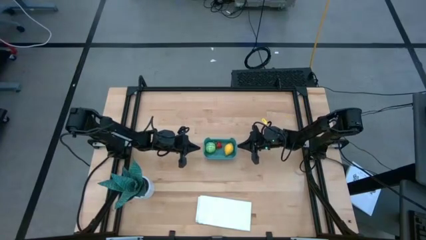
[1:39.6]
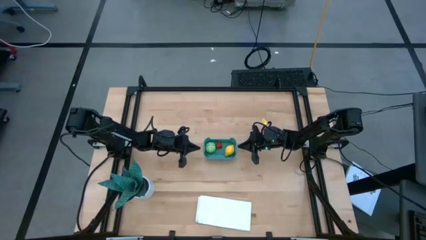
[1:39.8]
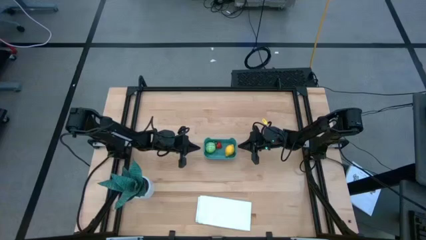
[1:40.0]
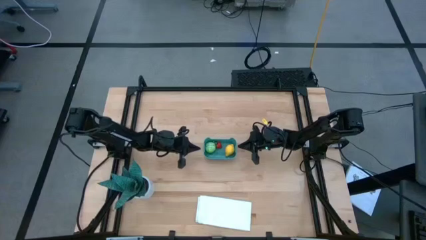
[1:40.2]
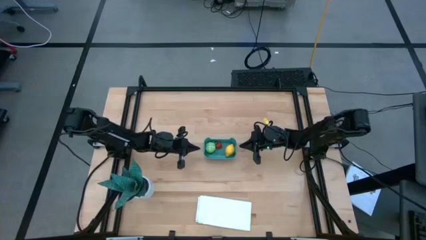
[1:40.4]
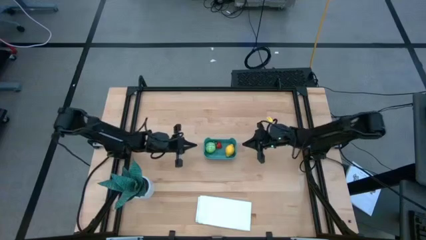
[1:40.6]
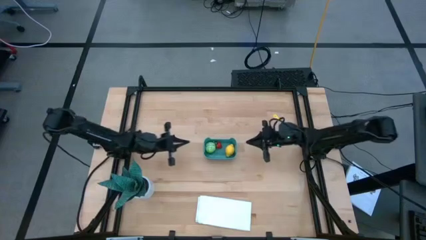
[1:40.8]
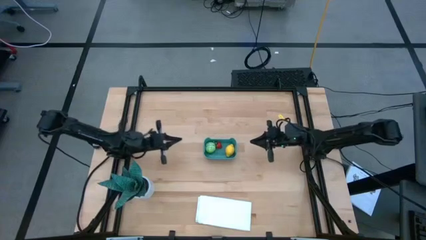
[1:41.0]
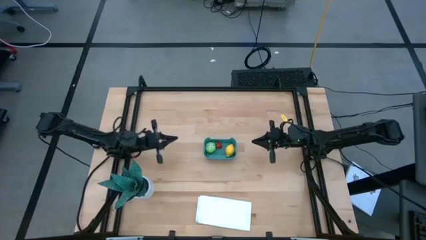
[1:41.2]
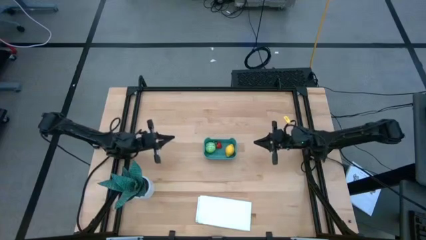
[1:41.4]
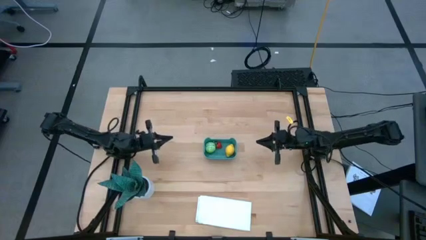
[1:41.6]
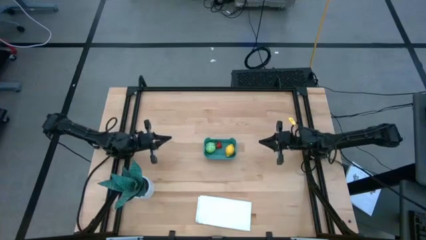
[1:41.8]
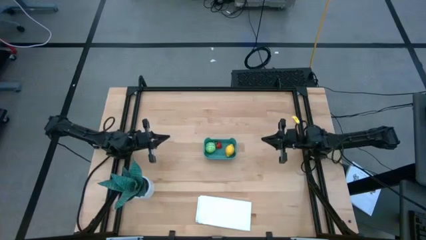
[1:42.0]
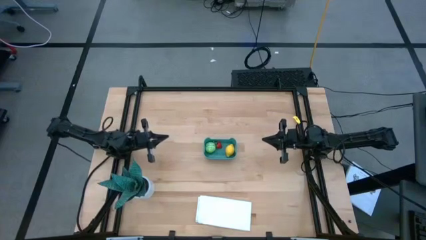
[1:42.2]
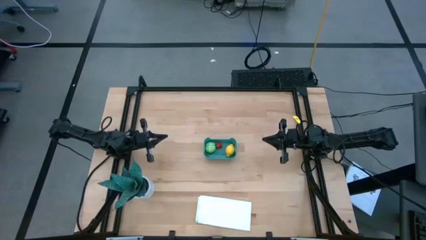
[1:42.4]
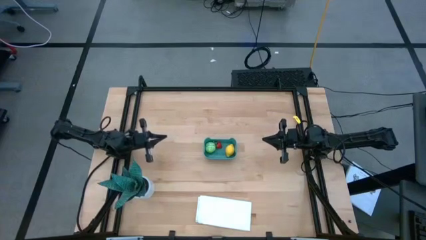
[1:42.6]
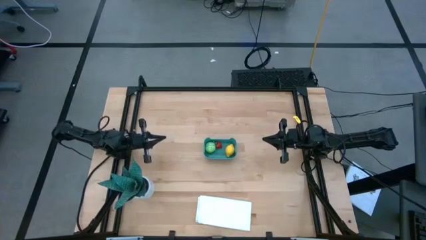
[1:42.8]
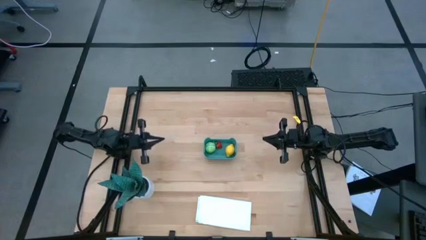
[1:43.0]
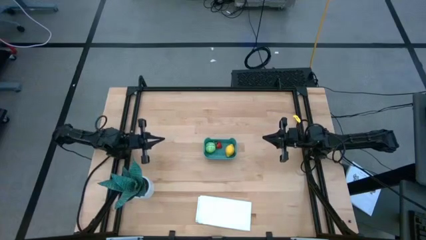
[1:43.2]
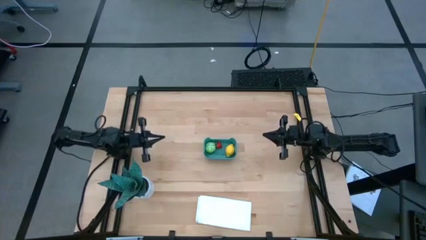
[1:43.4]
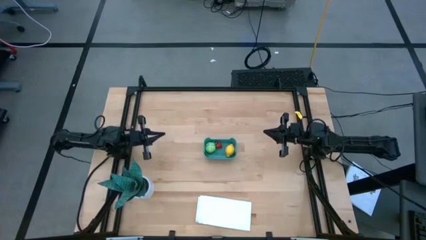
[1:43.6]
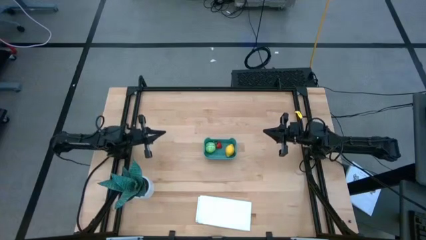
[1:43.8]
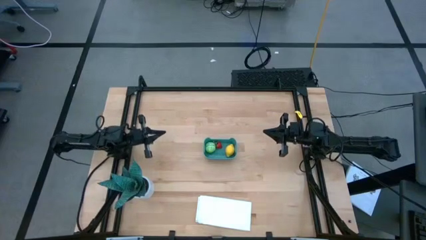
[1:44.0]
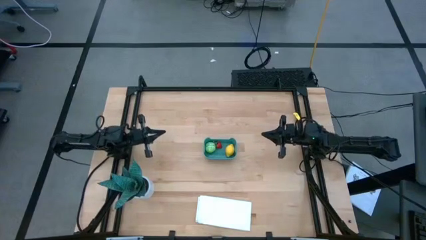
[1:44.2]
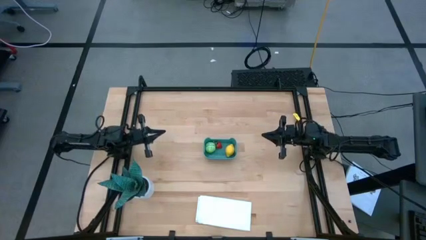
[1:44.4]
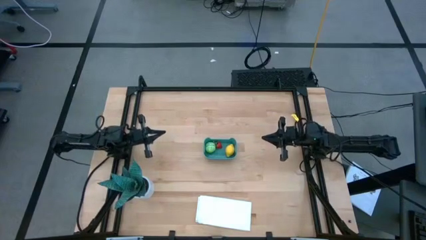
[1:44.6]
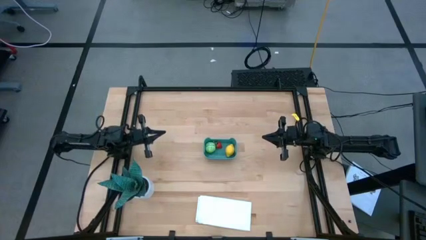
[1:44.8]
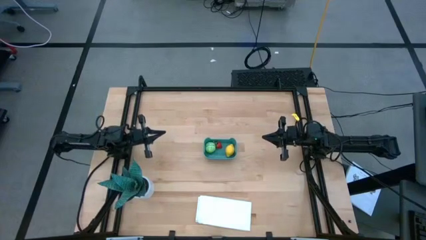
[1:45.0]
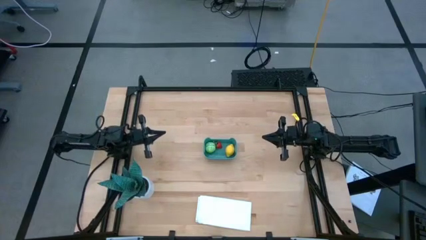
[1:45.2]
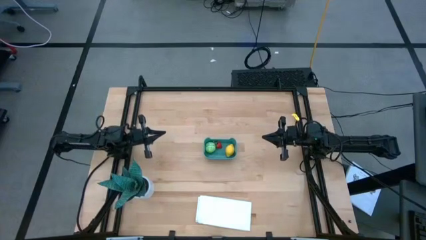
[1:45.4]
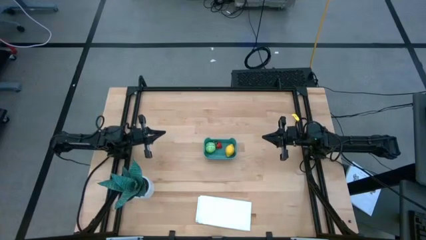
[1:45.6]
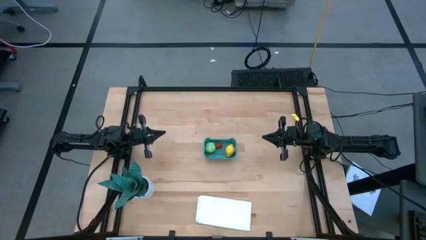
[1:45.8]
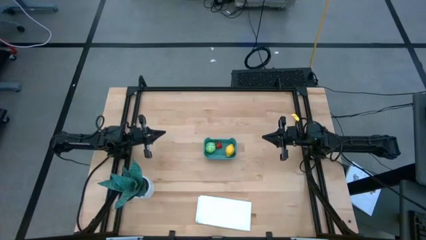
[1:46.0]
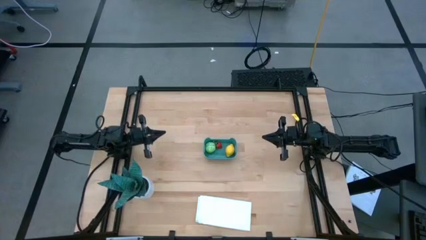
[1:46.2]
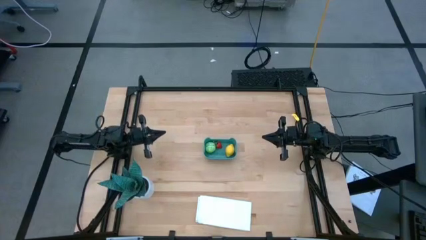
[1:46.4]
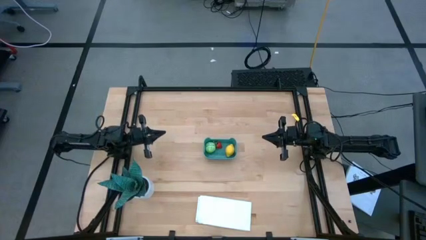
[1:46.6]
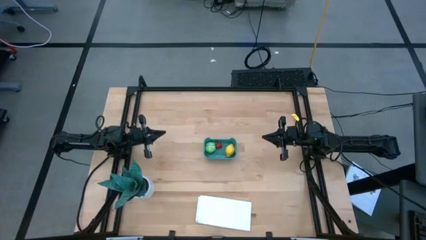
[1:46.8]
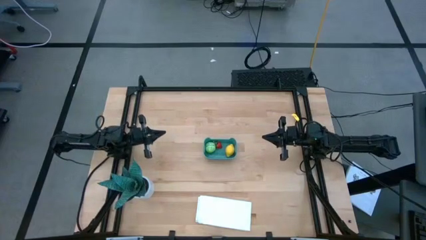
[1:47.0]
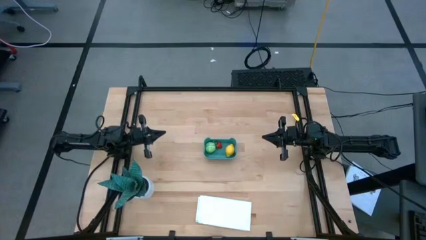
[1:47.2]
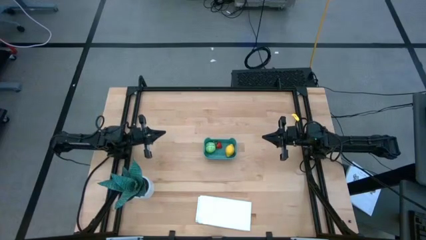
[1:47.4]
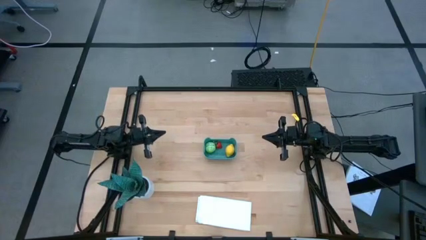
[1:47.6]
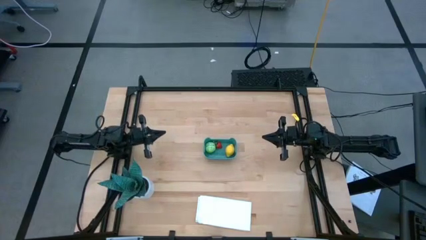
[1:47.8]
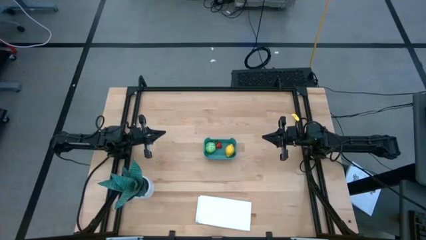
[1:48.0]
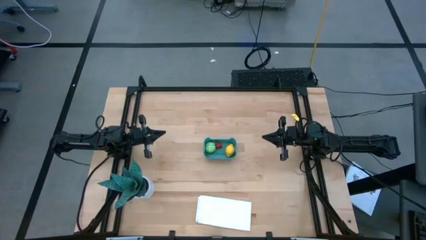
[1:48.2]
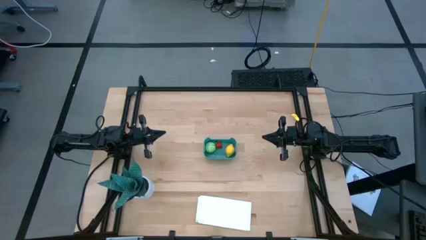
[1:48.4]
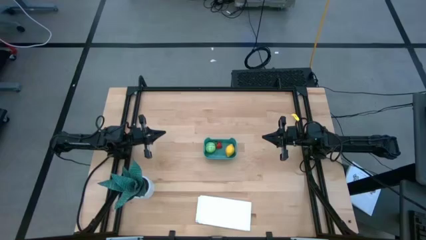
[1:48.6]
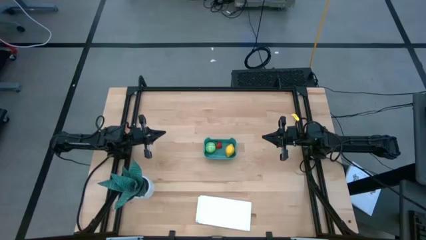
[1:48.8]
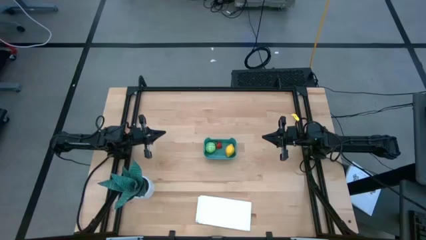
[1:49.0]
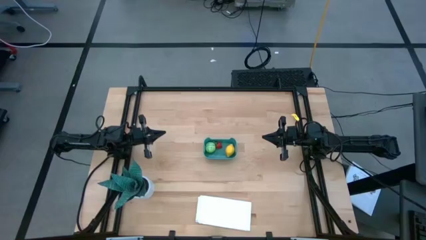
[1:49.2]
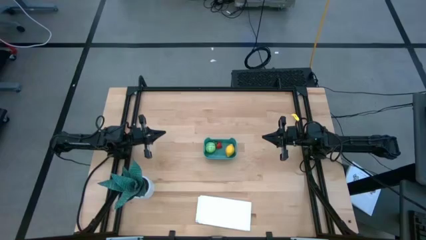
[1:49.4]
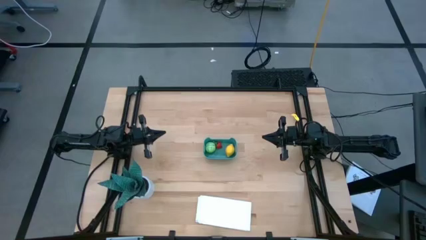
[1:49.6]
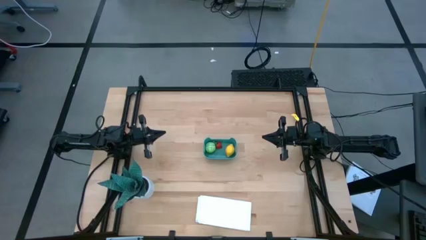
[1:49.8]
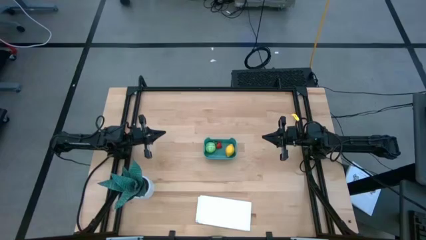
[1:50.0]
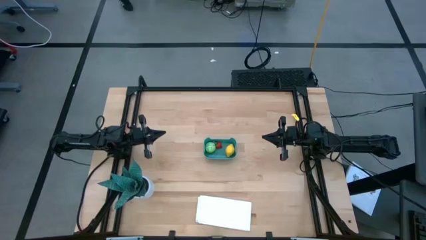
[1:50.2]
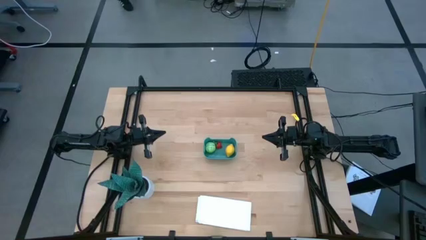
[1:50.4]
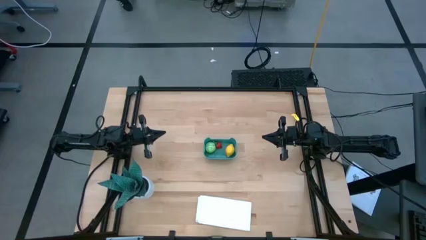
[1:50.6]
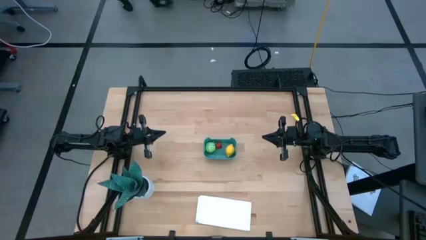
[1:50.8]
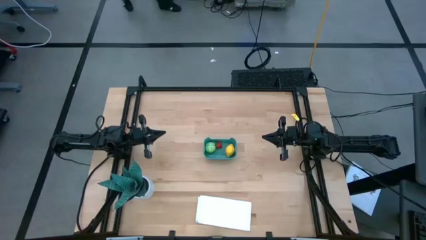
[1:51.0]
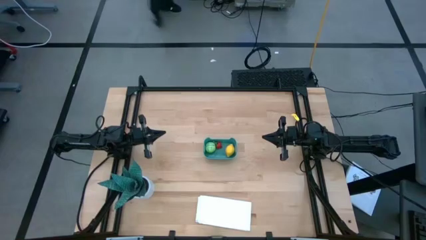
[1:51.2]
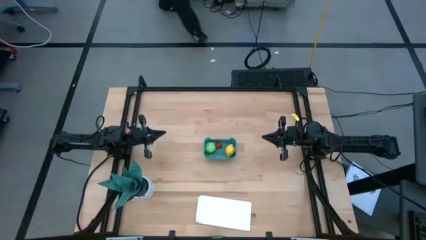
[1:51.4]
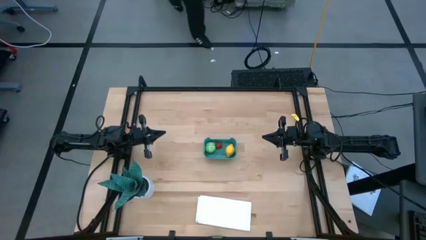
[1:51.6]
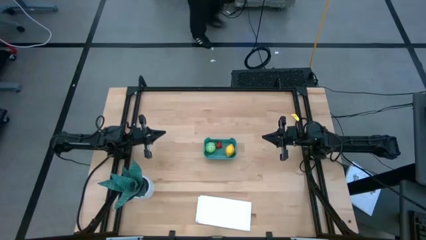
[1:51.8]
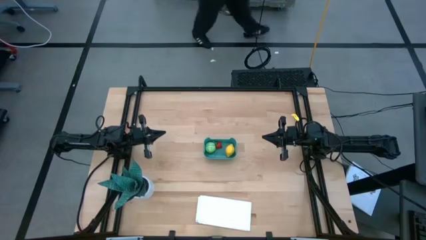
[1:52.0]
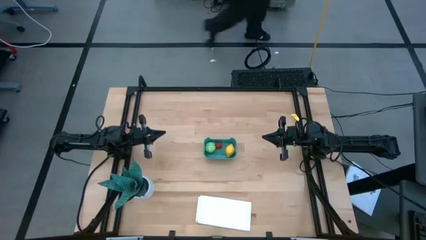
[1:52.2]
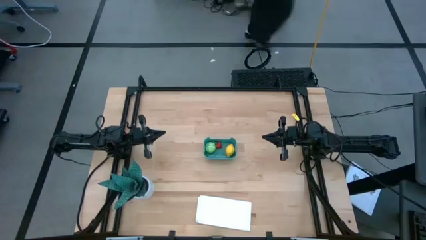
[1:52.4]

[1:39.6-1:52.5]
Task: Pick and placing Produce into tupperware
Return to home position

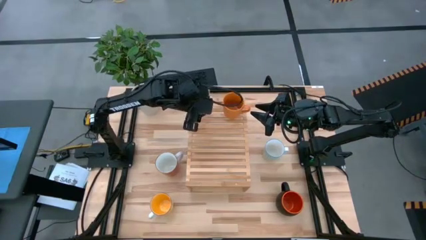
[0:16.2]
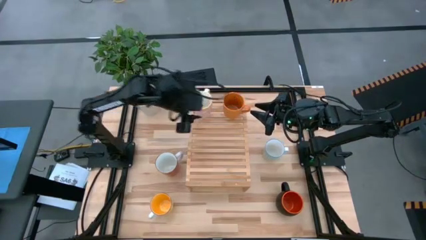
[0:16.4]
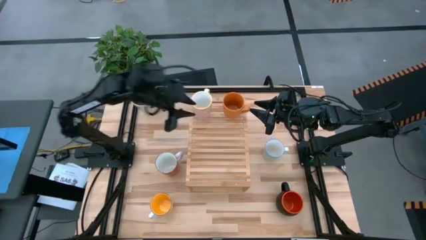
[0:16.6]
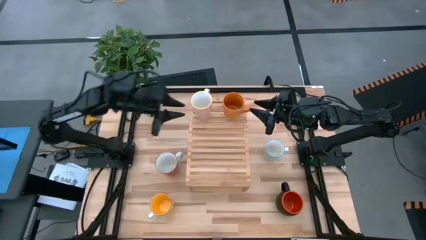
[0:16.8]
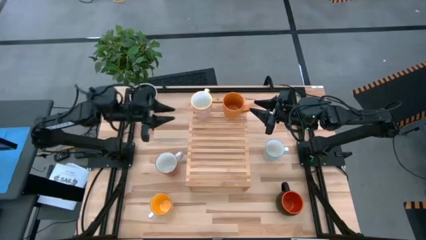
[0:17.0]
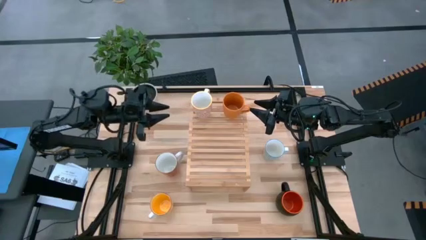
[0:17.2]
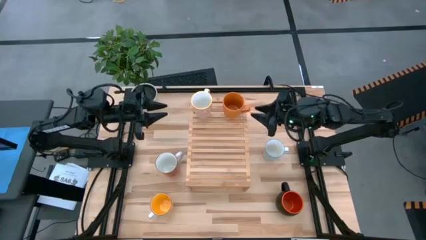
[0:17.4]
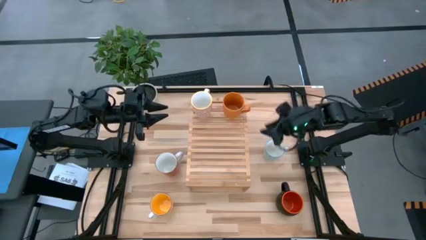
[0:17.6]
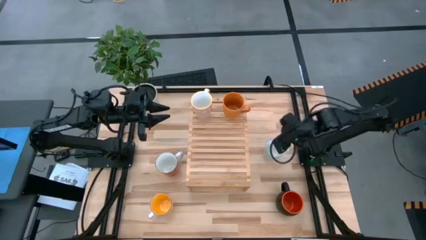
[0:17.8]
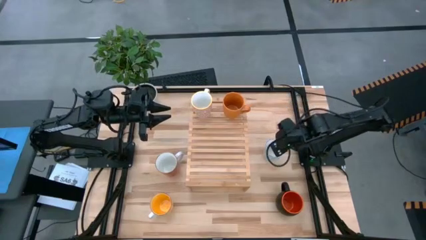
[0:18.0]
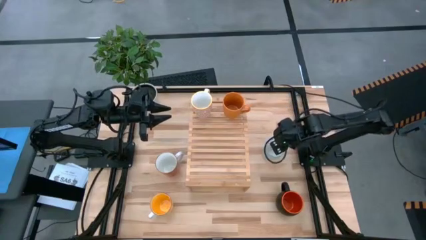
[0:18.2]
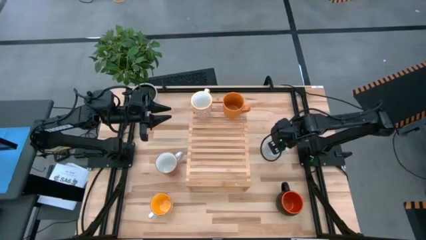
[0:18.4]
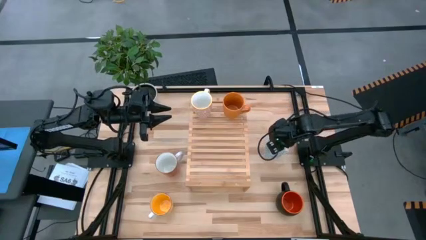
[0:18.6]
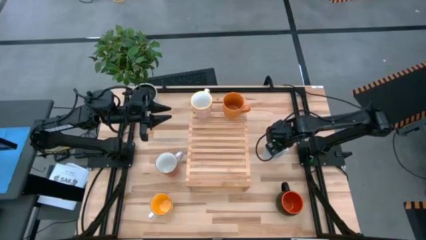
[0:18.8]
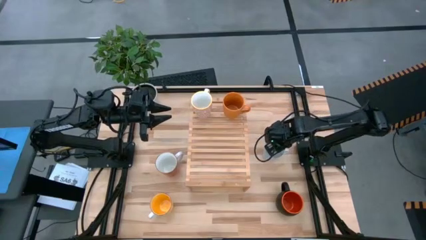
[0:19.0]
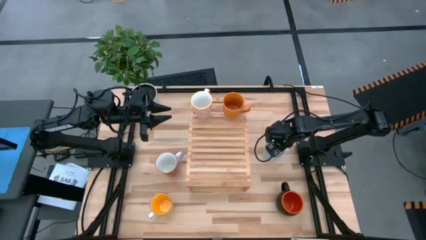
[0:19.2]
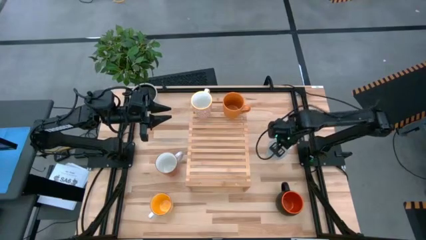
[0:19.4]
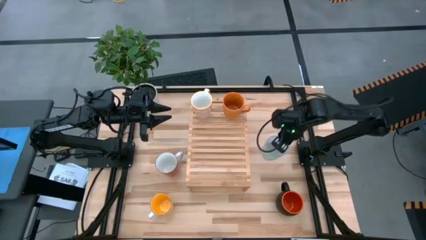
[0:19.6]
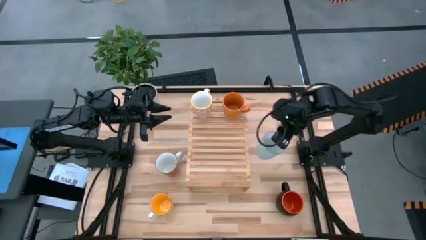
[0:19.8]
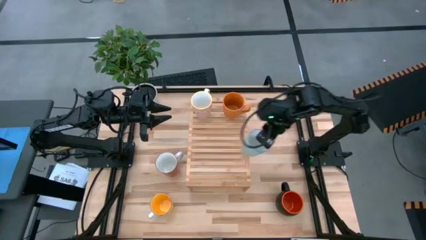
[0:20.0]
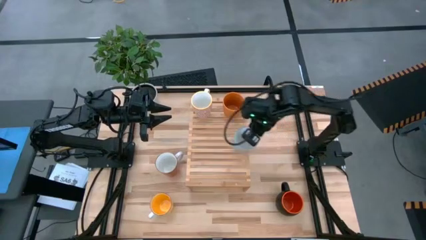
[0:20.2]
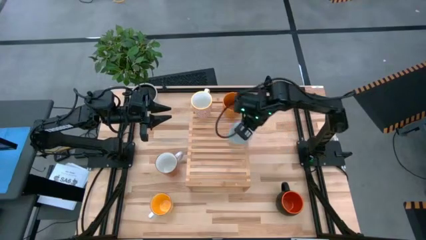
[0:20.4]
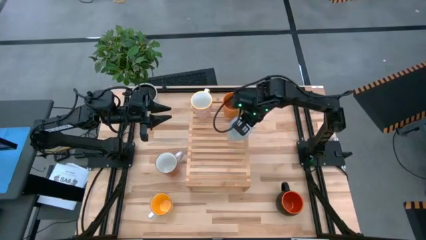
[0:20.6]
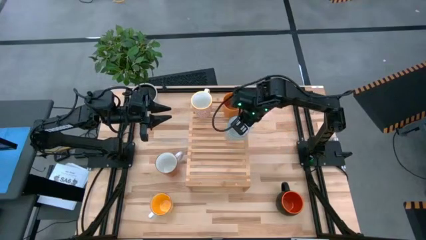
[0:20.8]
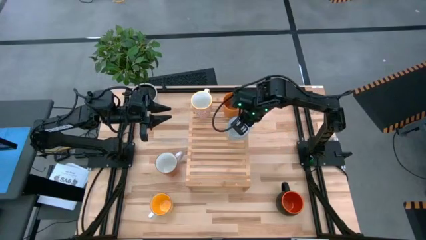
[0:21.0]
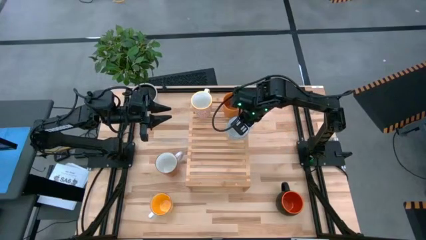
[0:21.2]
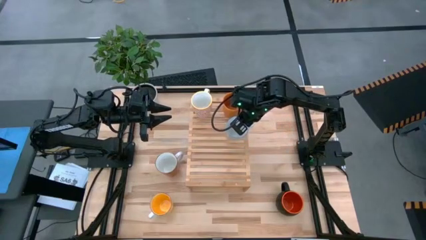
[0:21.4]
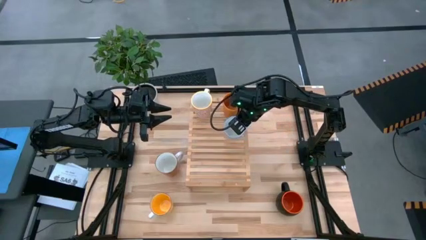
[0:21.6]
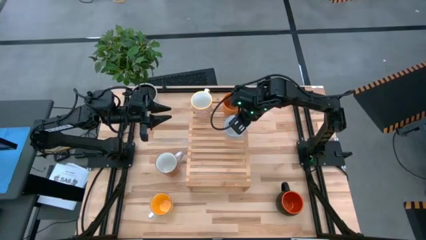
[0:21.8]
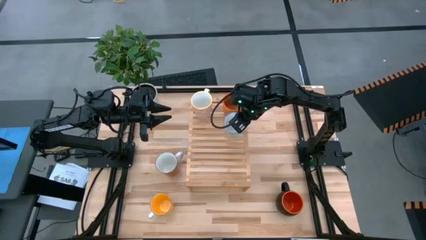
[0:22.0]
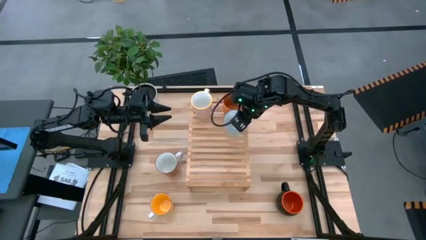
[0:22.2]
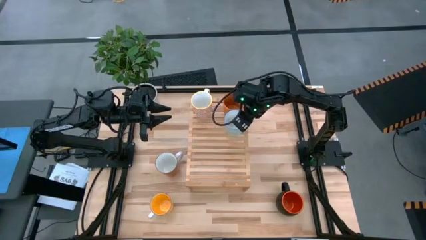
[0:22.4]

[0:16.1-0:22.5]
Task: Place coffee mugs
Put the blue cup on the shelf aligned with the other orange cup
